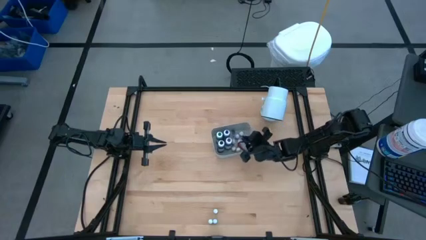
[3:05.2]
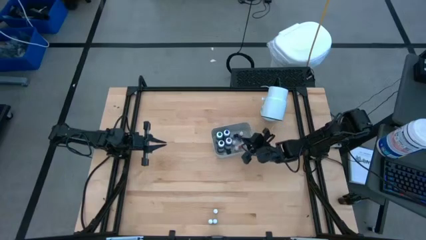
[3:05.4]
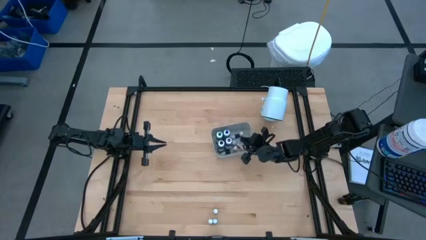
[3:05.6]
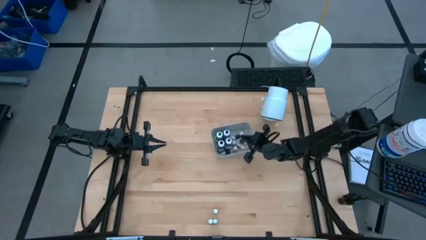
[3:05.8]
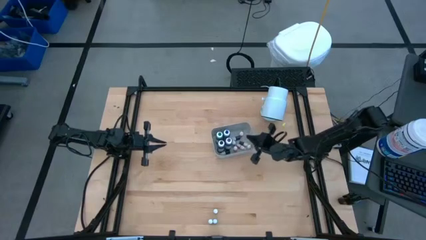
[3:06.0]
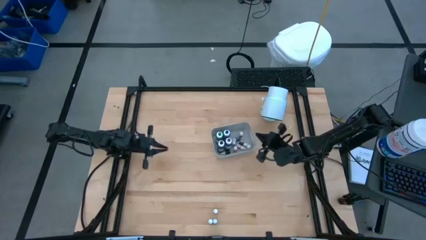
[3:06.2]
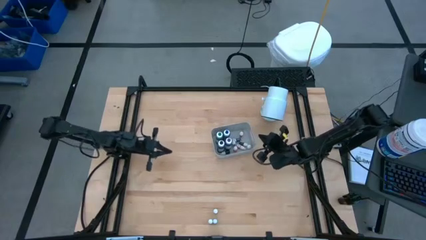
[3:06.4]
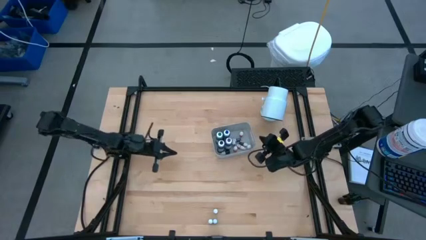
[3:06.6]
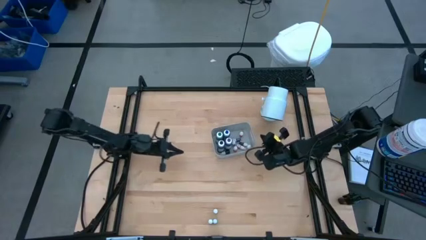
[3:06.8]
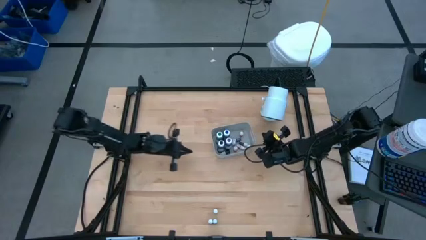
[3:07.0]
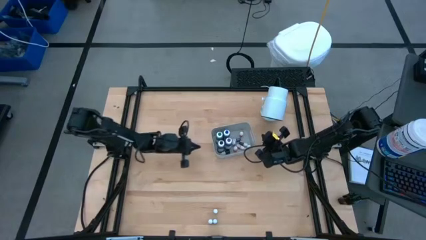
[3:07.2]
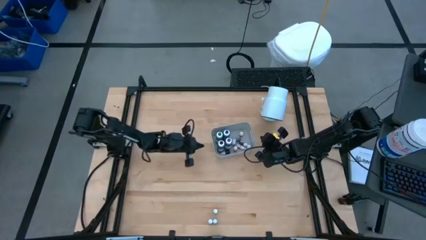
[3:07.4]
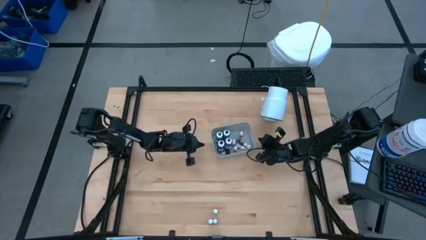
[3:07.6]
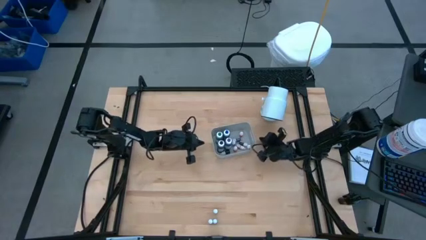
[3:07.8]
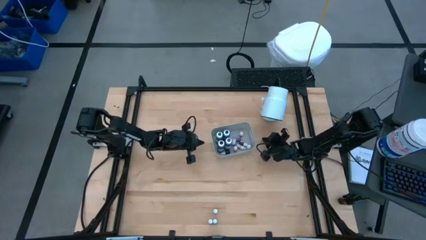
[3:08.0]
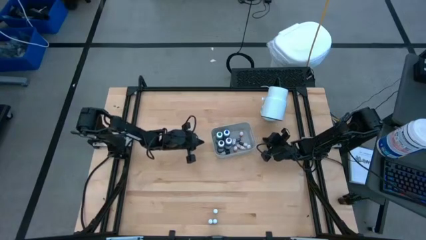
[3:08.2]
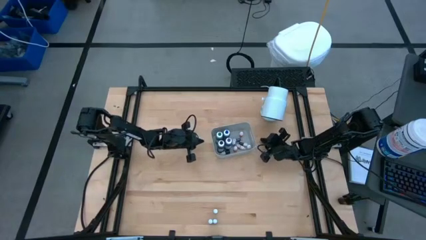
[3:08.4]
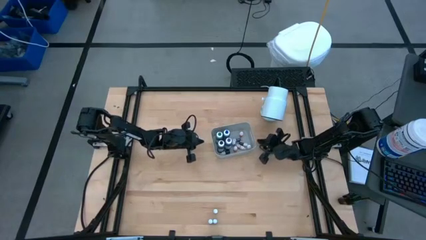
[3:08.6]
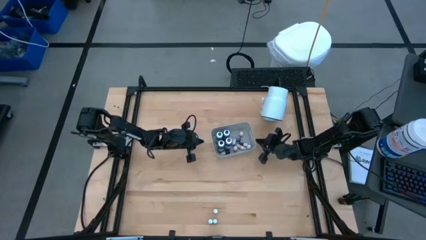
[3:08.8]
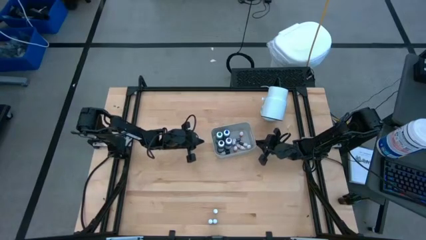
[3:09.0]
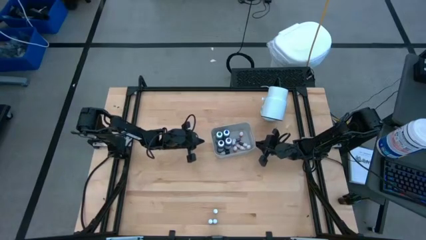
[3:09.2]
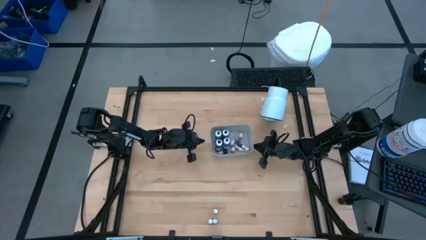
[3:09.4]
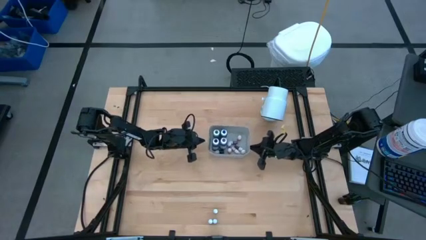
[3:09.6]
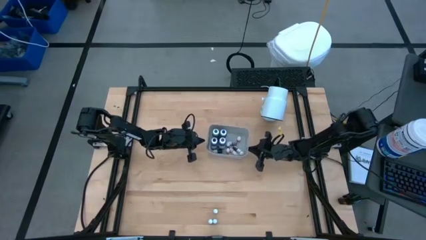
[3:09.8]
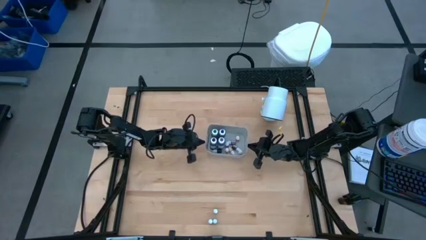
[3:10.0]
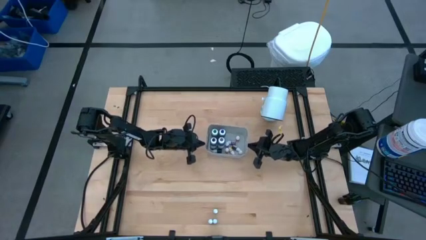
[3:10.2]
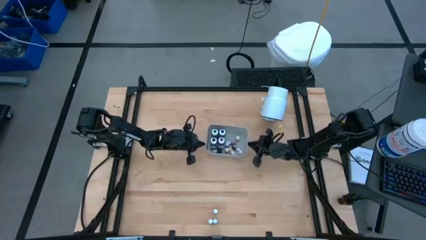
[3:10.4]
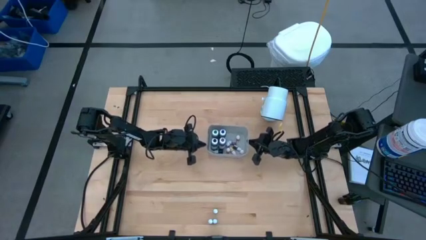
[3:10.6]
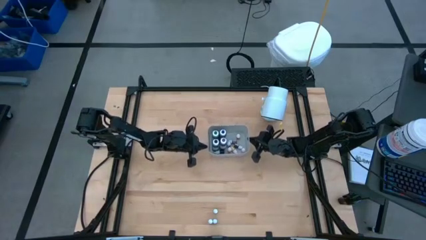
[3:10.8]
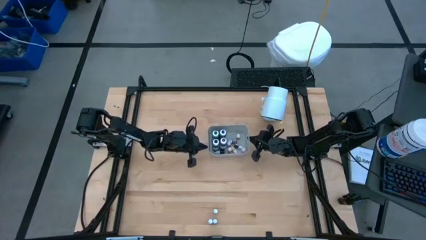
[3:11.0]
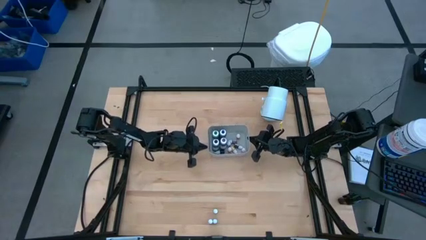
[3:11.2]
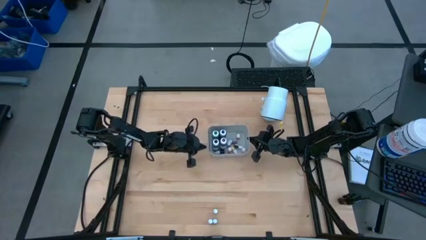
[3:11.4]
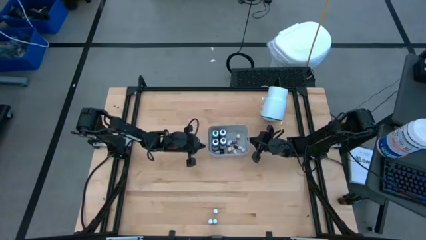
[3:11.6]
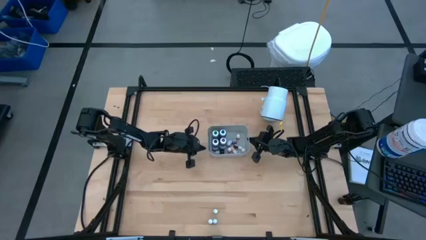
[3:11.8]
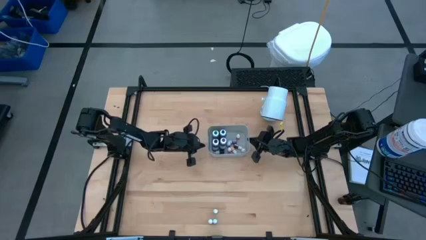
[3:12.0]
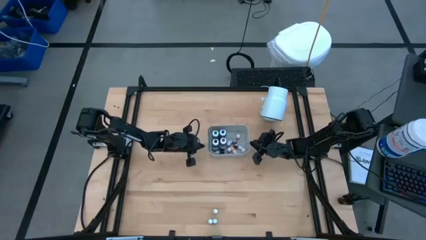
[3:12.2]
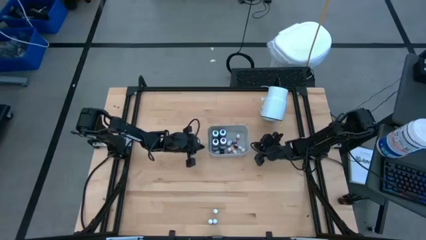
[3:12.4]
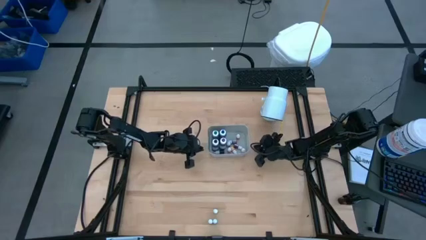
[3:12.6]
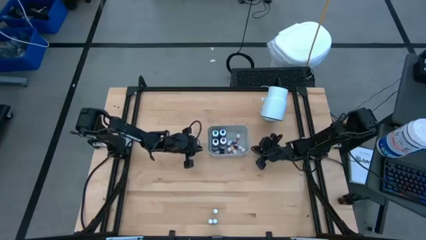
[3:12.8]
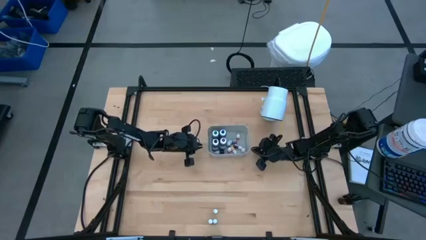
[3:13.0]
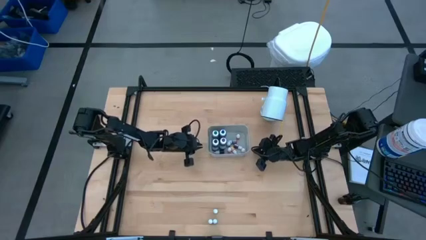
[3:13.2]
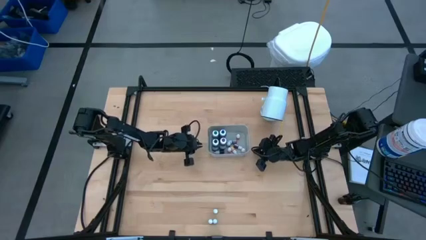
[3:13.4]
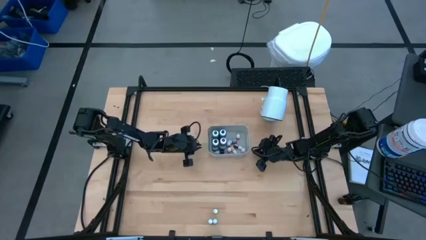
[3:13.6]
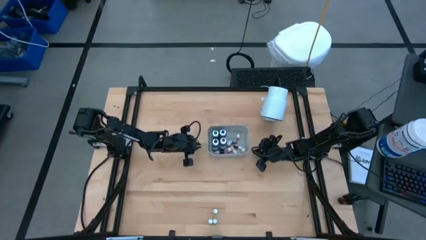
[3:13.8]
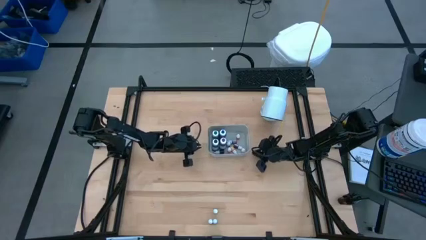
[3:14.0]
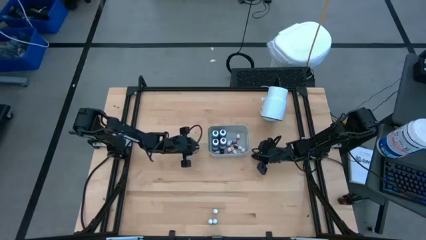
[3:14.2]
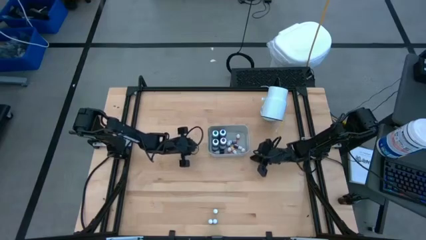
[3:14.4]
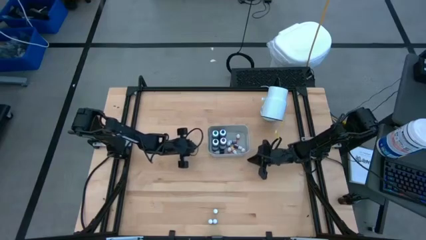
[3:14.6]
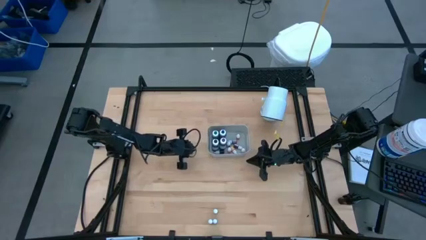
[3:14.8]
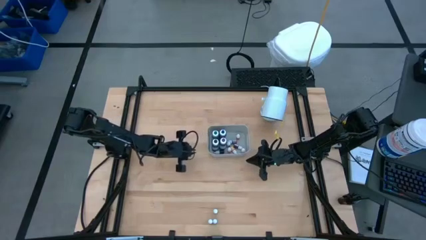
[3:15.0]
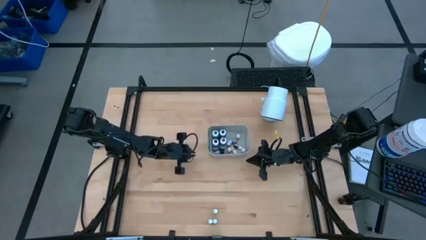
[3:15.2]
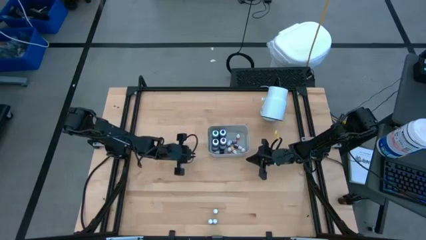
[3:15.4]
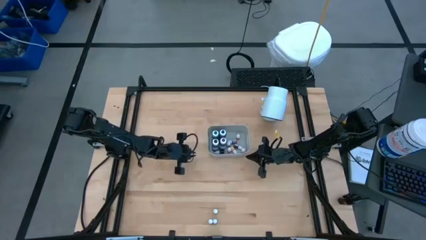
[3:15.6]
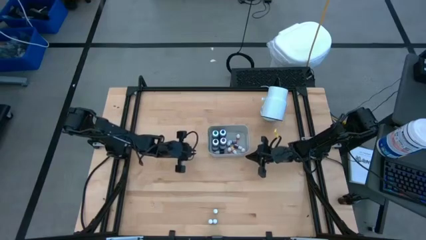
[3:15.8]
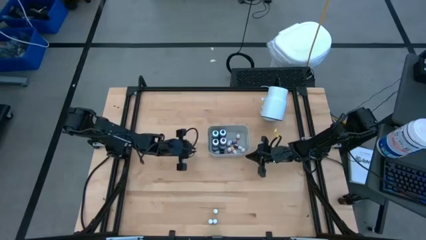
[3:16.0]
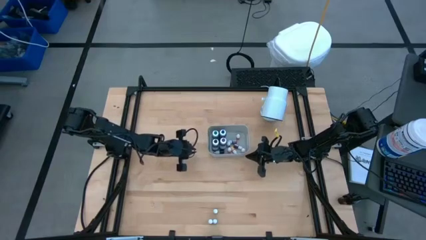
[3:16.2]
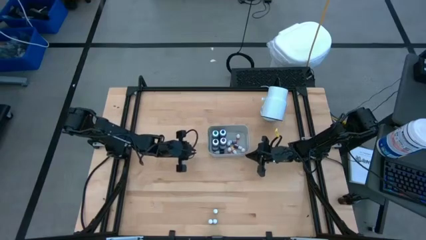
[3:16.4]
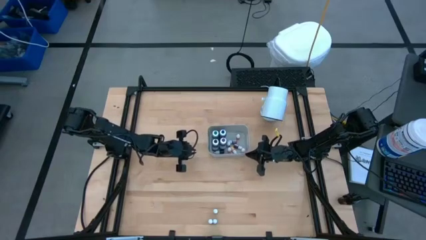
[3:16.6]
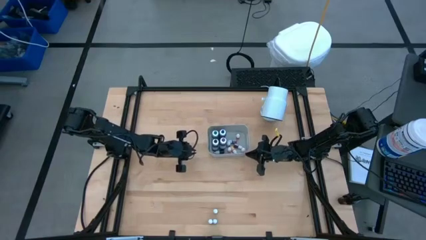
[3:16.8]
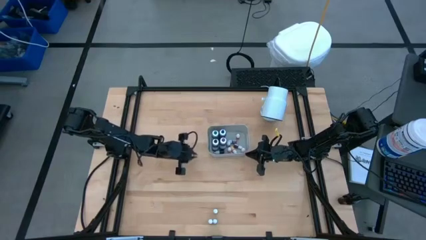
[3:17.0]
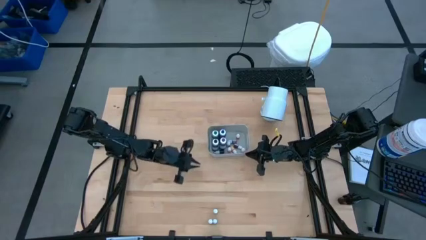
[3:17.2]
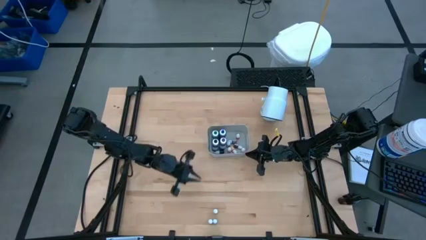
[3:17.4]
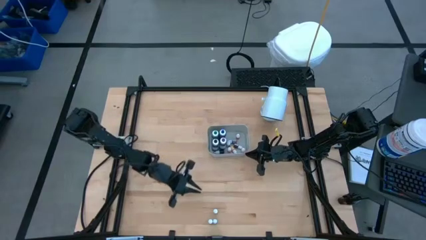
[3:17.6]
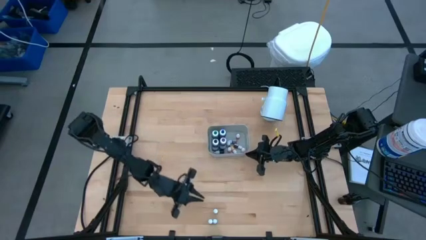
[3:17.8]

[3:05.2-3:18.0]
Task: Pick & Place food coloring
Adjust the gray bin
